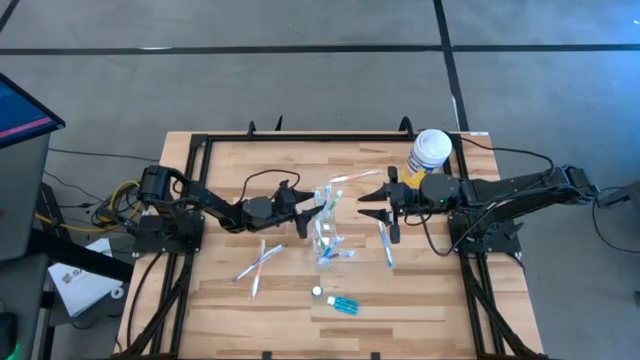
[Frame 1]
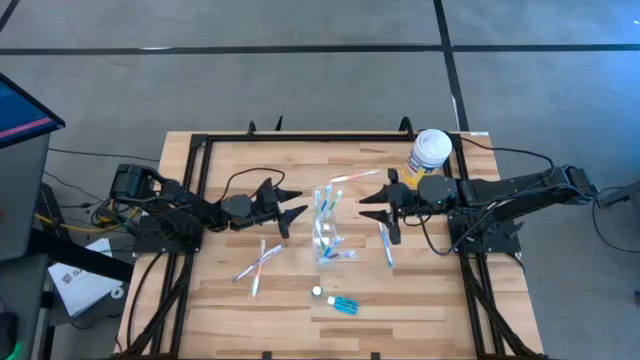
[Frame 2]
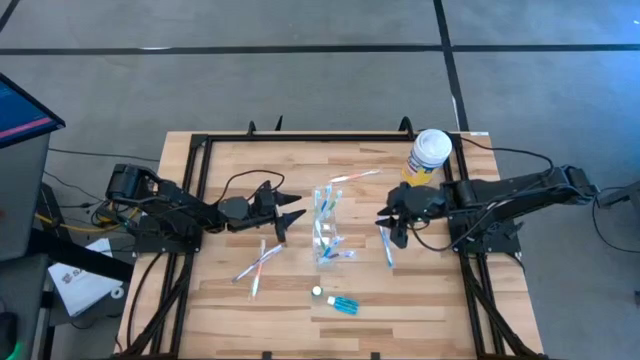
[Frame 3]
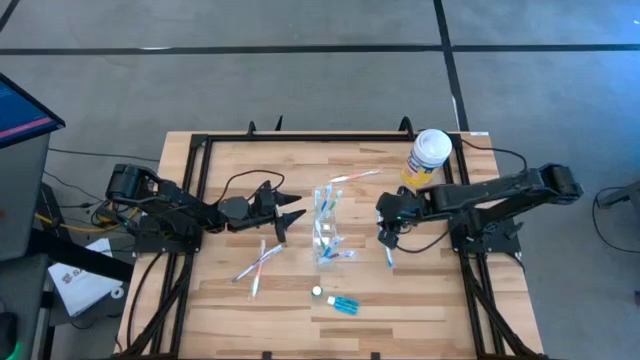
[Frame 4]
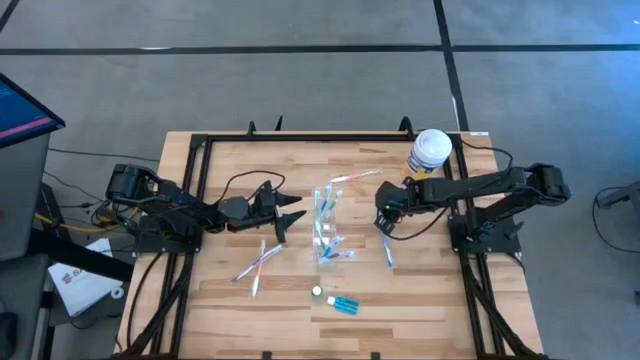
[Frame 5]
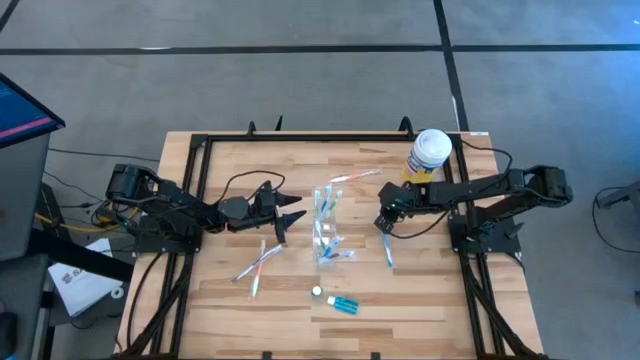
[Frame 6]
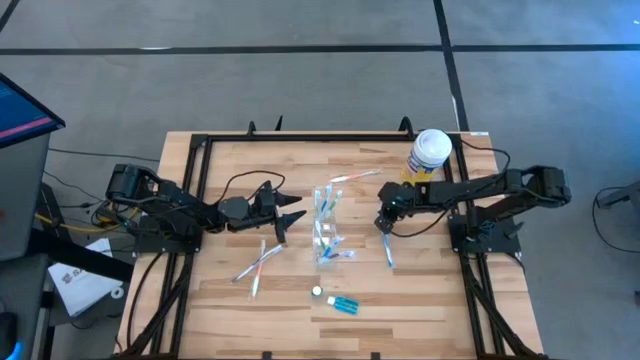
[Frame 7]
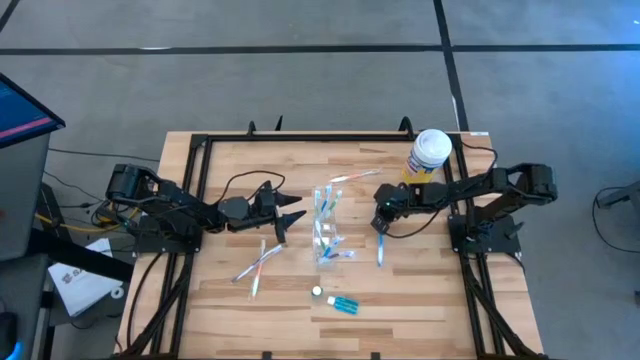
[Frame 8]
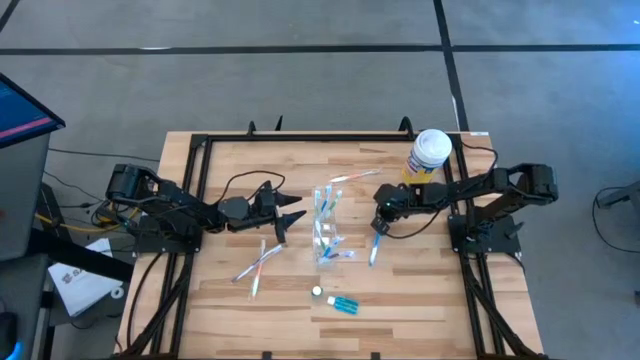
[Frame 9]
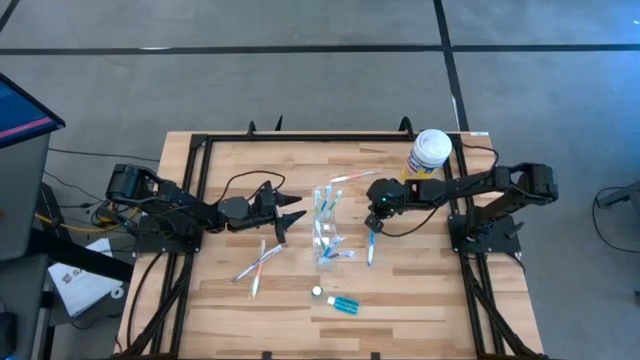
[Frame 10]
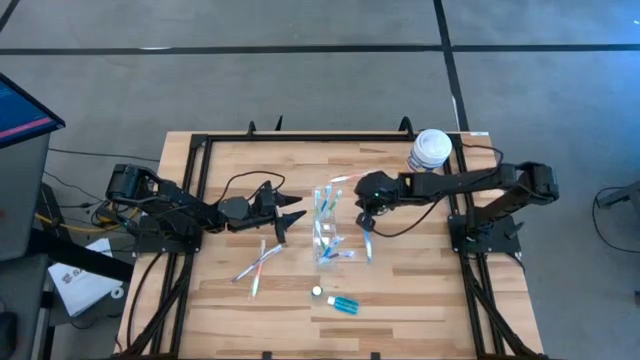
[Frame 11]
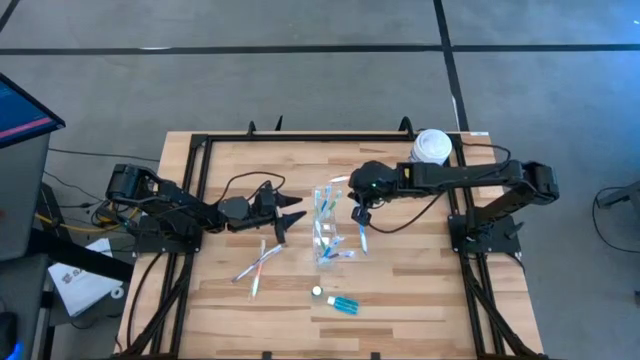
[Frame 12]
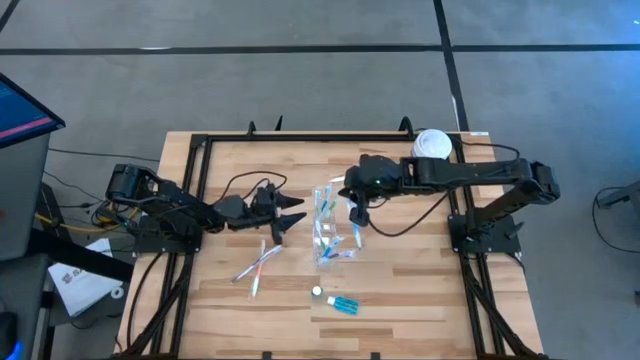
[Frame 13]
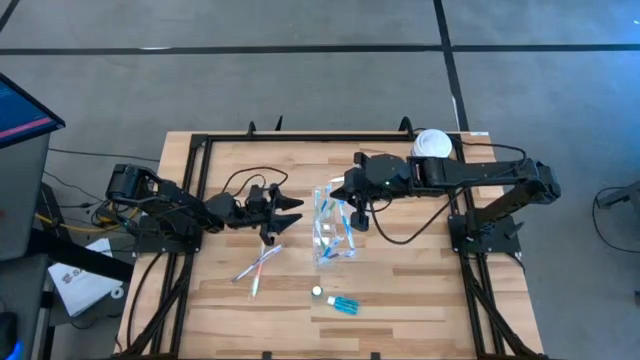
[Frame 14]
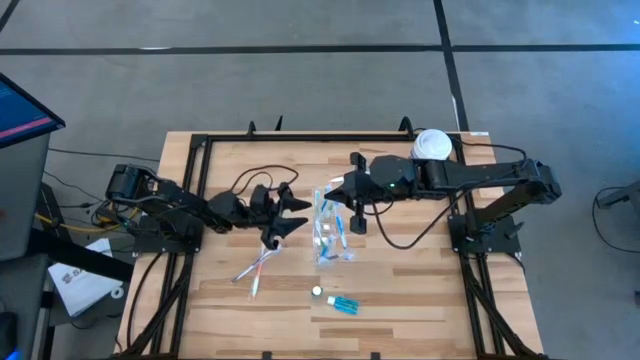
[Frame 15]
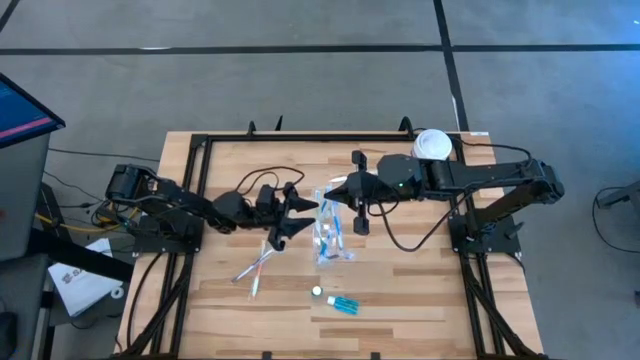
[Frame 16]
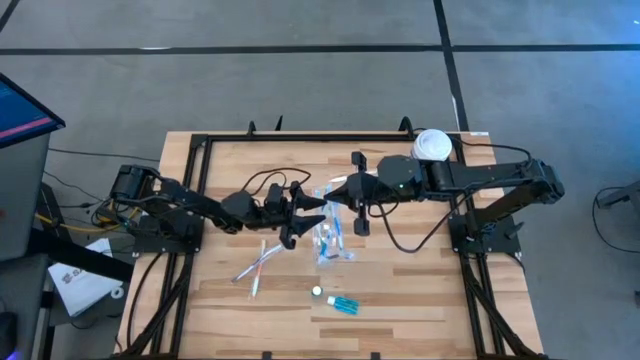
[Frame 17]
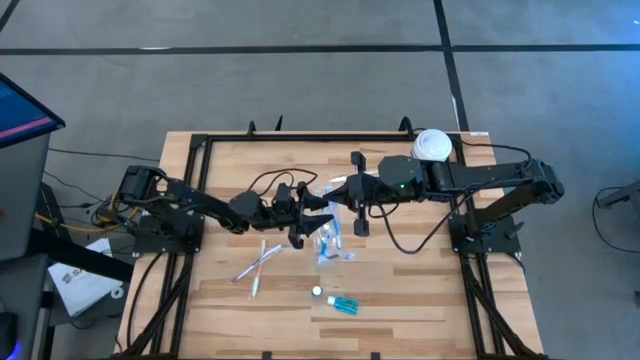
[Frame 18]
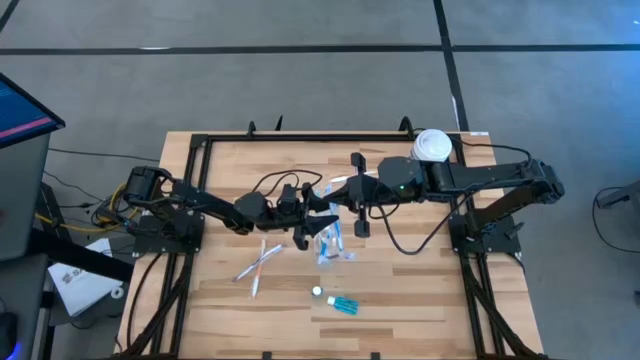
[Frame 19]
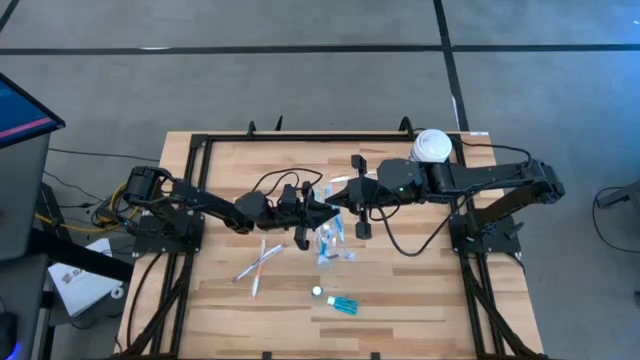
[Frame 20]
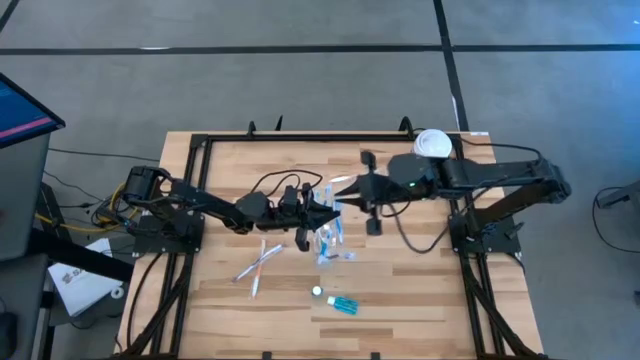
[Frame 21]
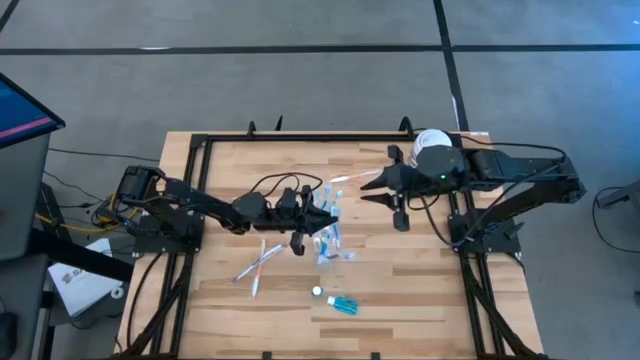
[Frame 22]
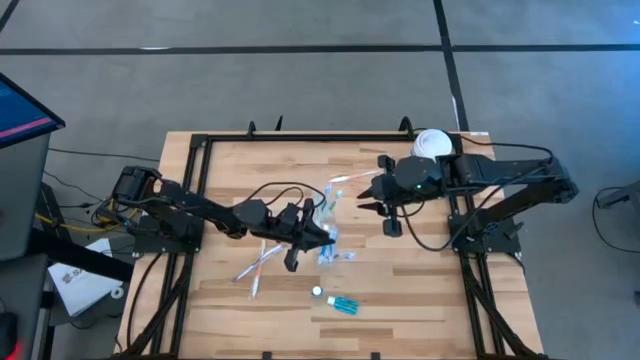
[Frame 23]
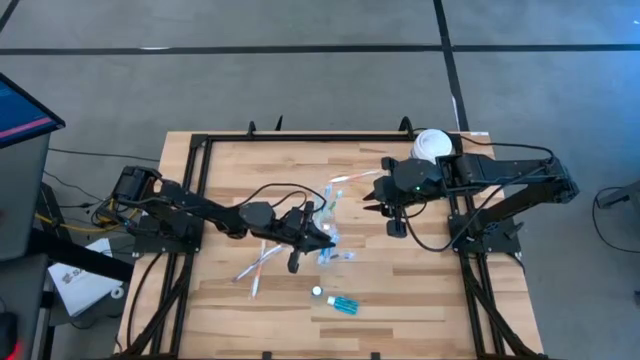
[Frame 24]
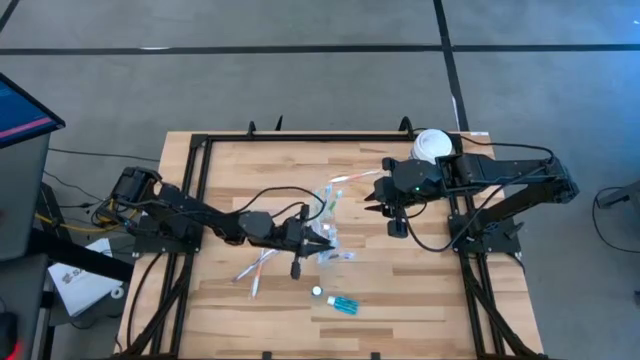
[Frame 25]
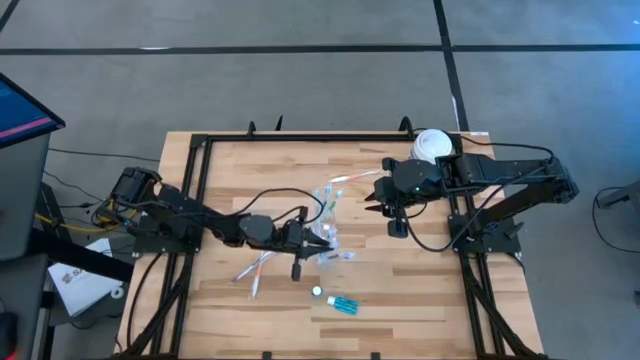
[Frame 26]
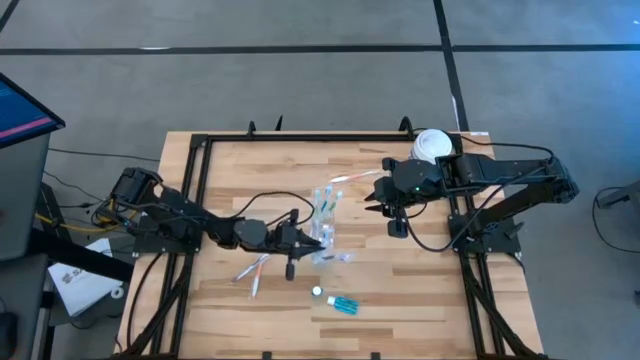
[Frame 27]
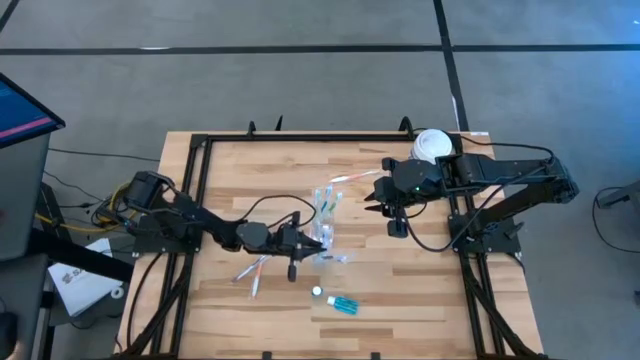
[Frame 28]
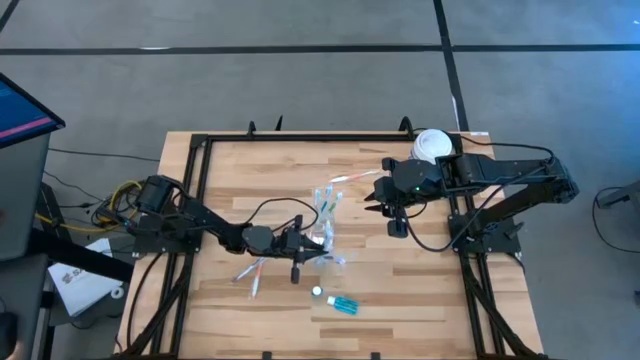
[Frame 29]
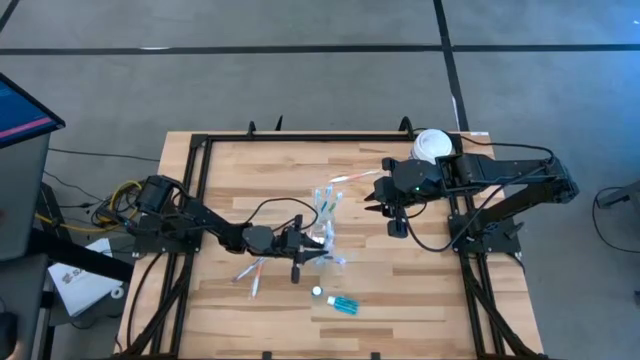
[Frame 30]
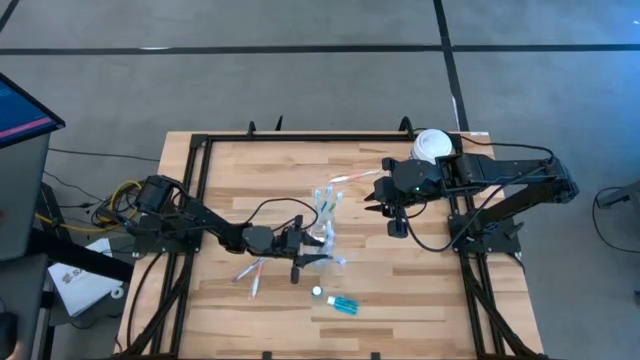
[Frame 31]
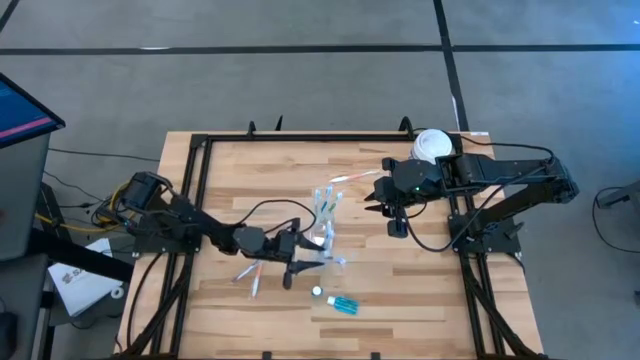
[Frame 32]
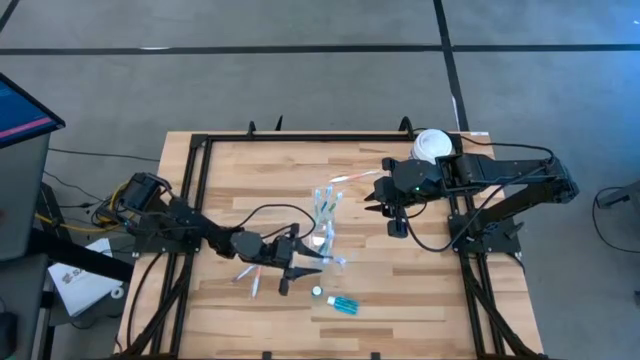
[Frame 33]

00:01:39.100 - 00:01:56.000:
Task: Pick & Place toothbrushing station
Put the blue toothbrush into the transparent organizer

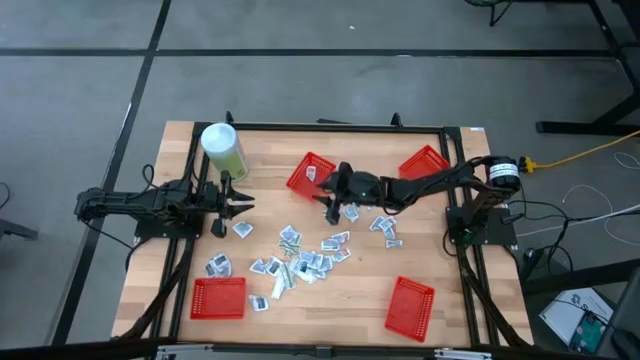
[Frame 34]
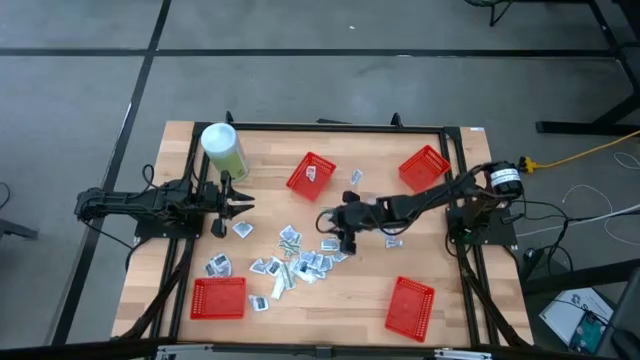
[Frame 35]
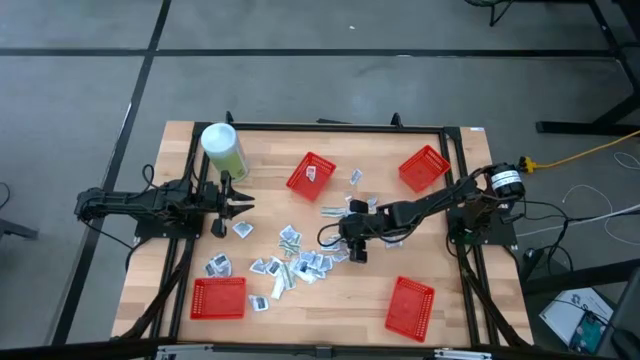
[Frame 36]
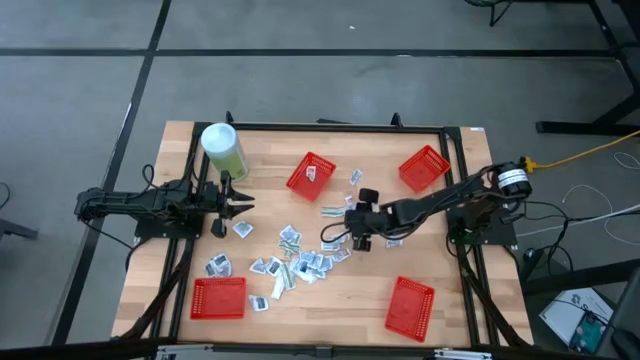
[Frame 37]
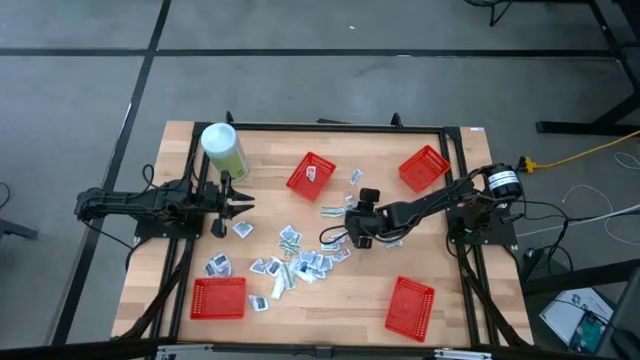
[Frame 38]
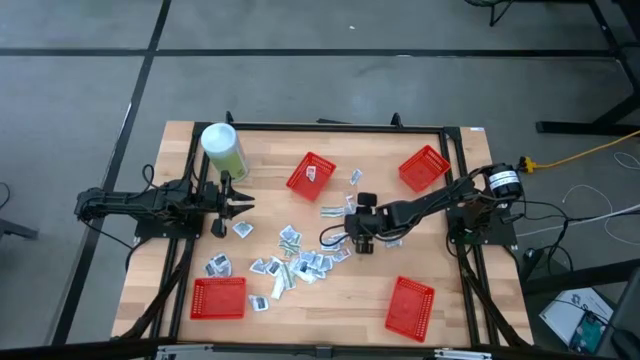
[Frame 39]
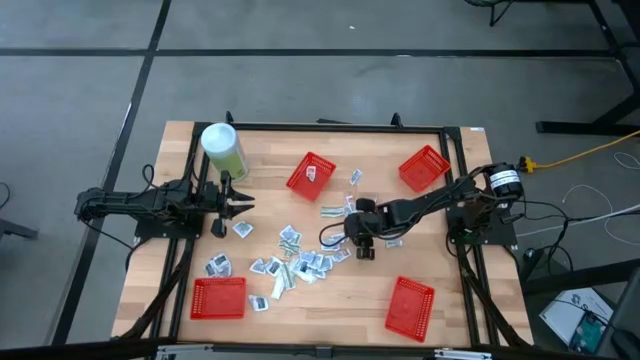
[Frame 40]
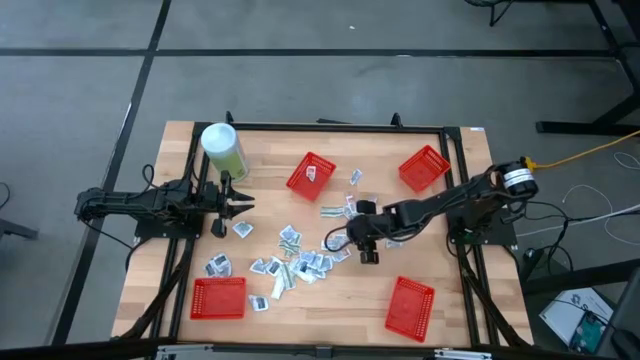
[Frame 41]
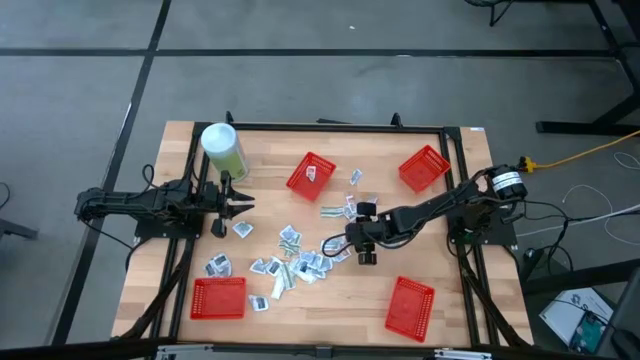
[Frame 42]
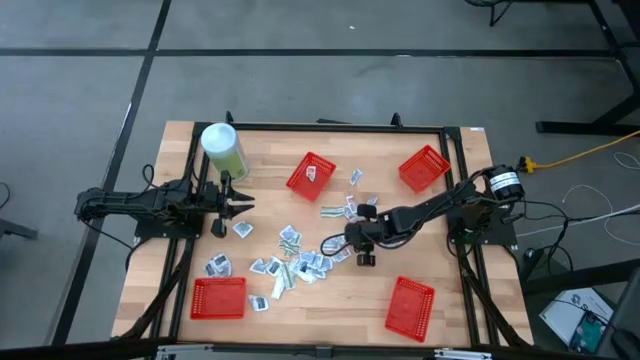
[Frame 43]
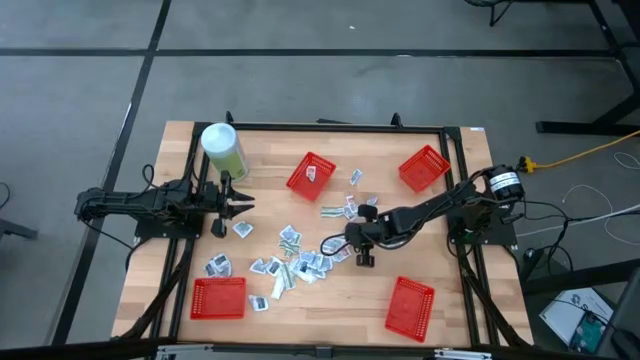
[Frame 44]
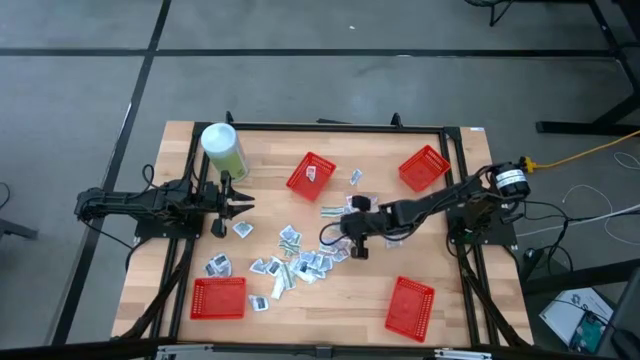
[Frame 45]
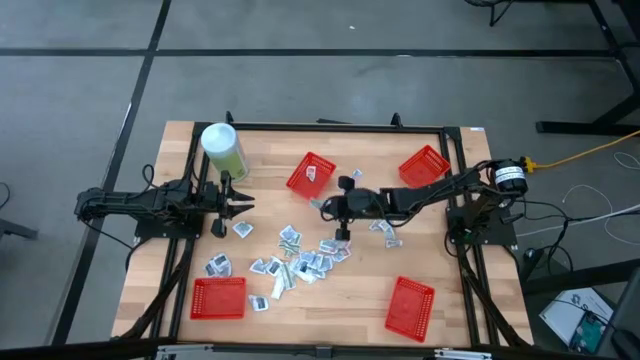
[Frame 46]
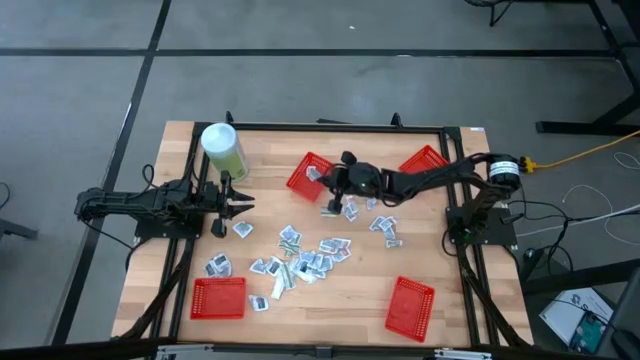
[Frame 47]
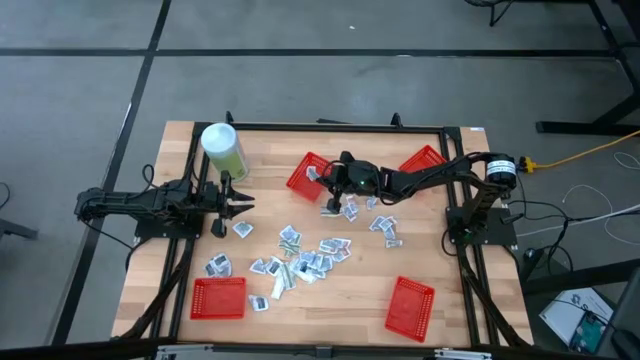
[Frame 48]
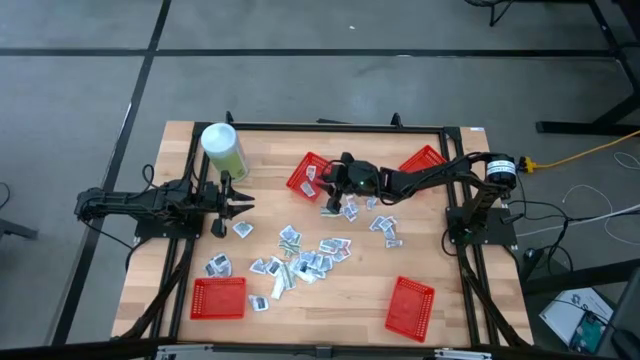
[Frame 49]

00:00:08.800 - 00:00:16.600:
Task: Pick & Place First Aid Supplies
Put the orange ointment pack into the red container
